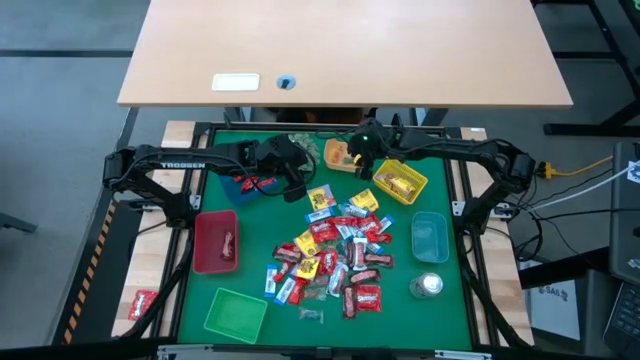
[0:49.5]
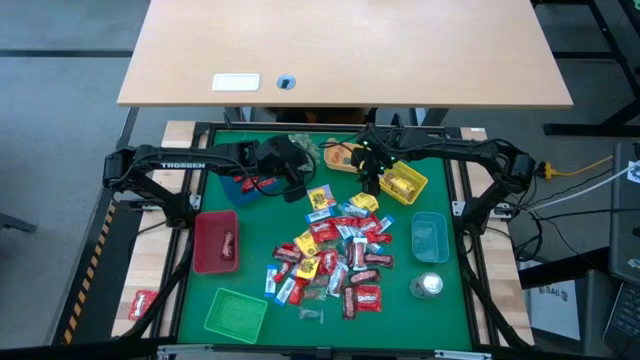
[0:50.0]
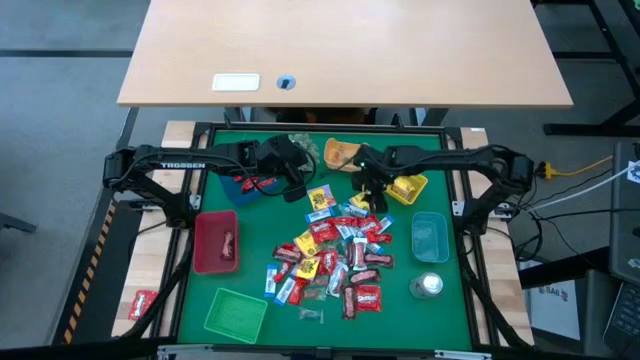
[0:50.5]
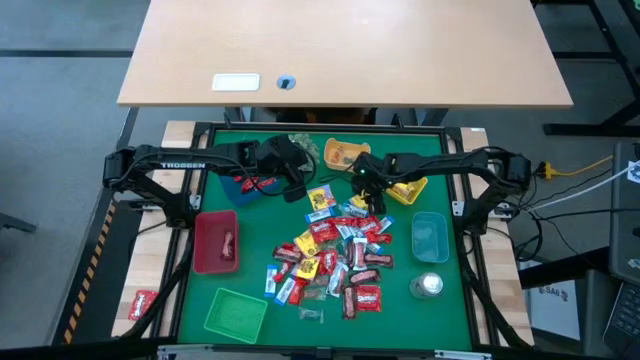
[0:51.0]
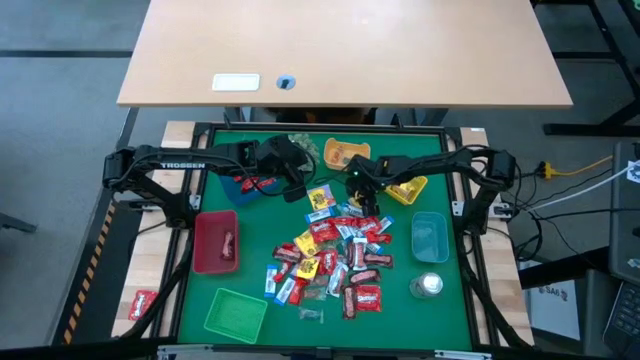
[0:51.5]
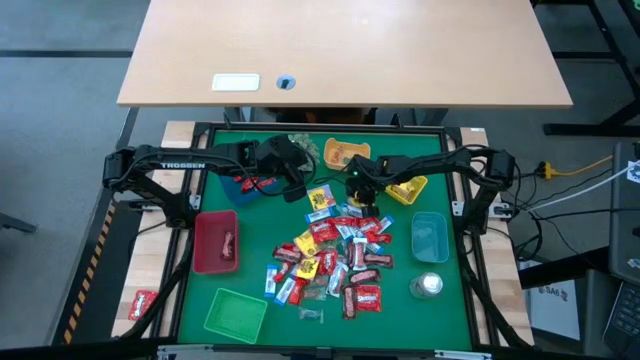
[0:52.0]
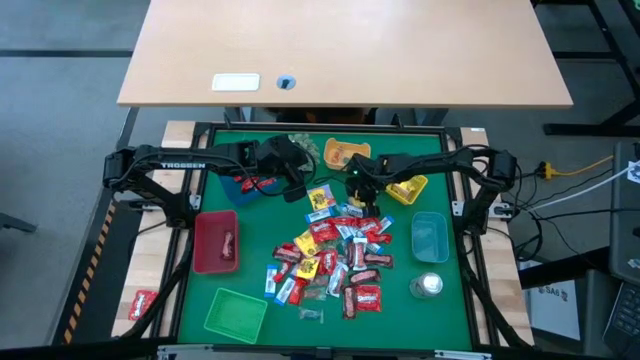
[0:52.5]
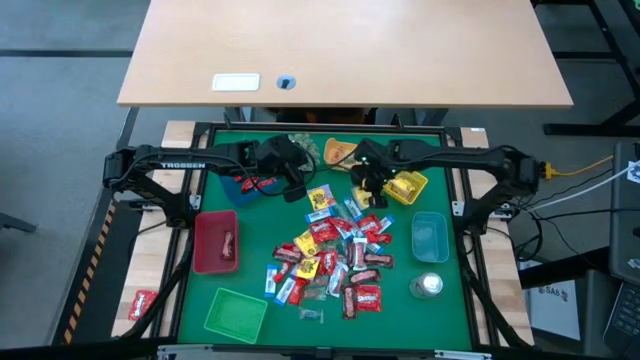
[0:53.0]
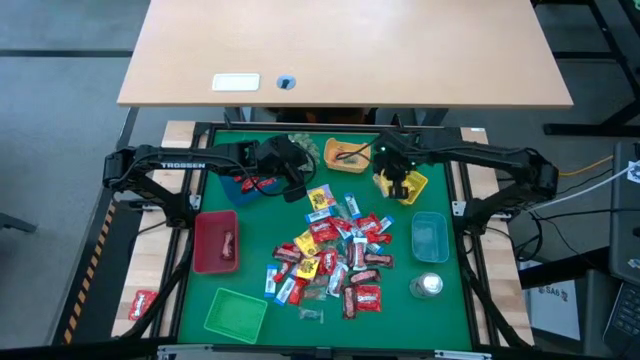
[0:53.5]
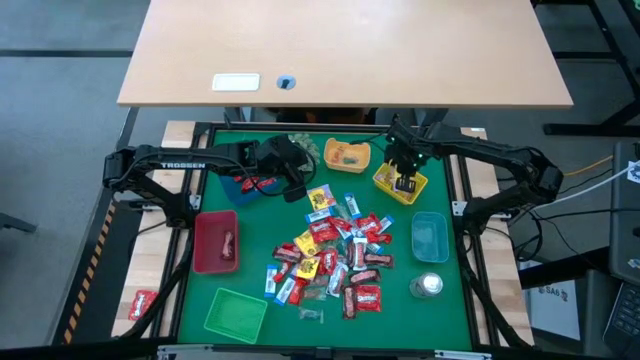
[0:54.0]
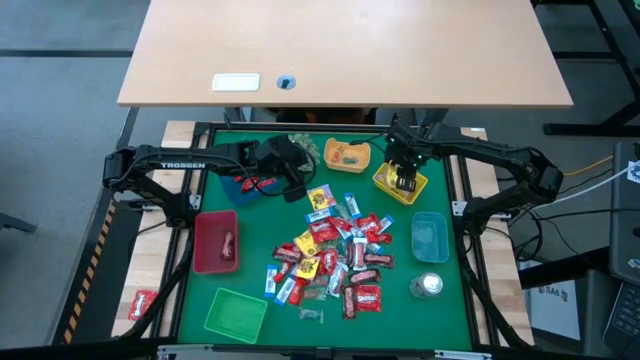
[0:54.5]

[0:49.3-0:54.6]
Task: Sort candy
Put the yellow candy into the yellow bin

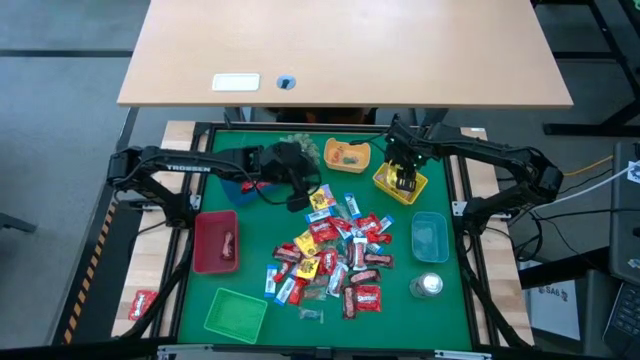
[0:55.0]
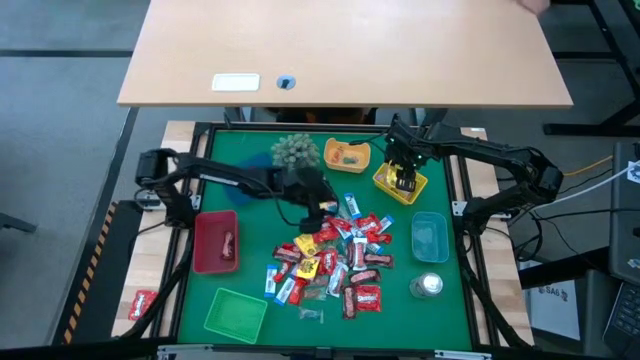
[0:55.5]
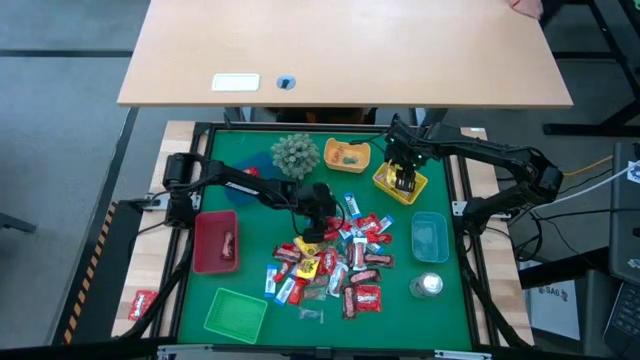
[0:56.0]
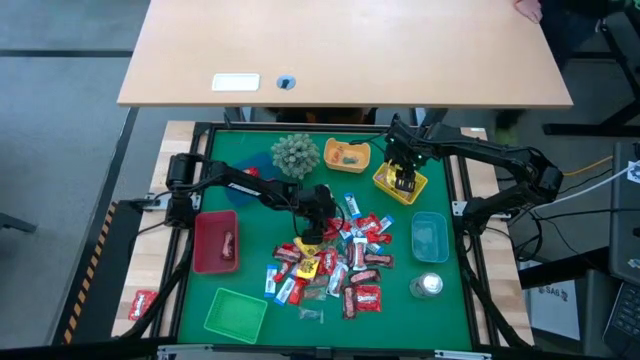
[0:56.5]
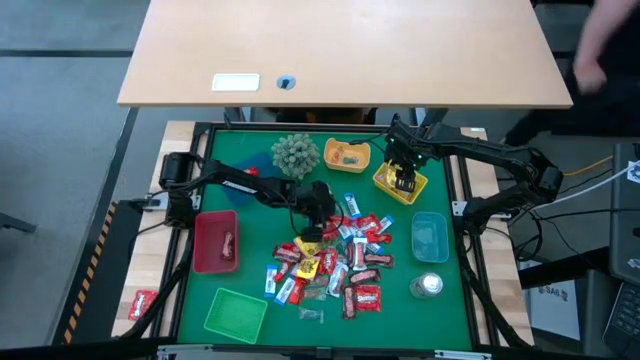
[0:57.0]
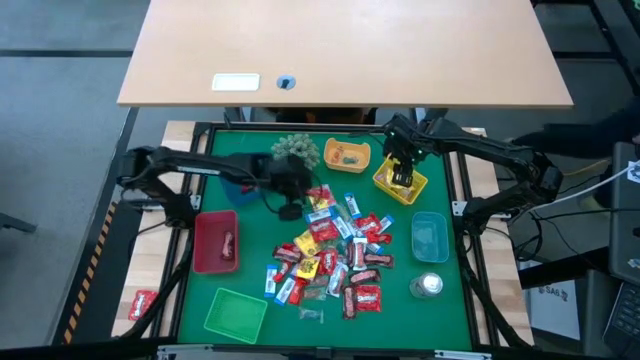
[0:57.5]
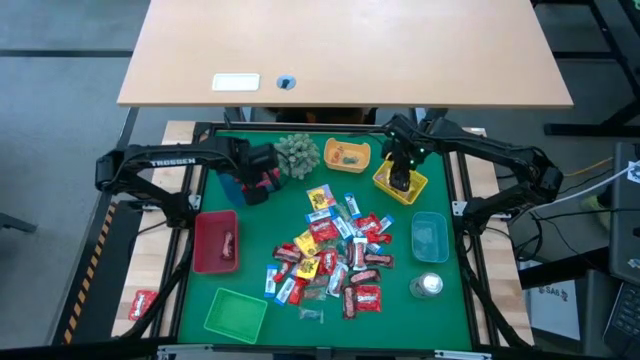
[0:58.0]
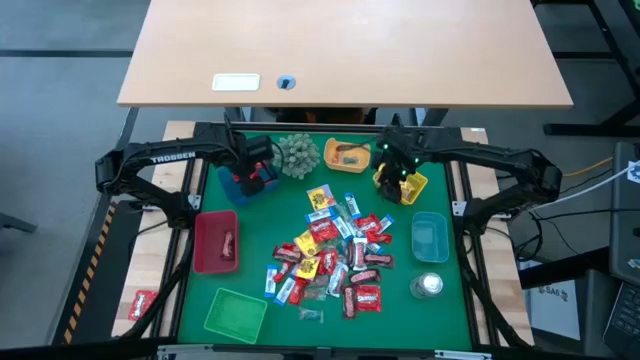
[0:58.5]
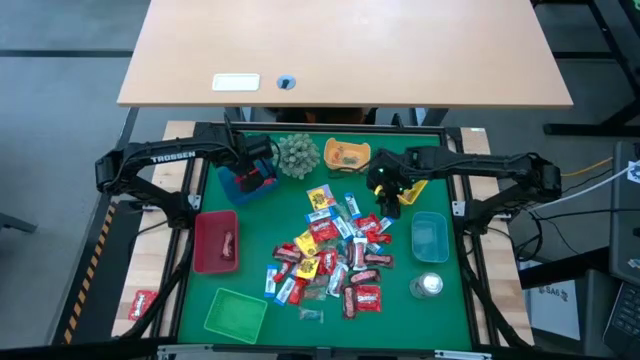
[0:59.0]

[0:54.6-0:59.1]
Put the red chocolate into the blue bin

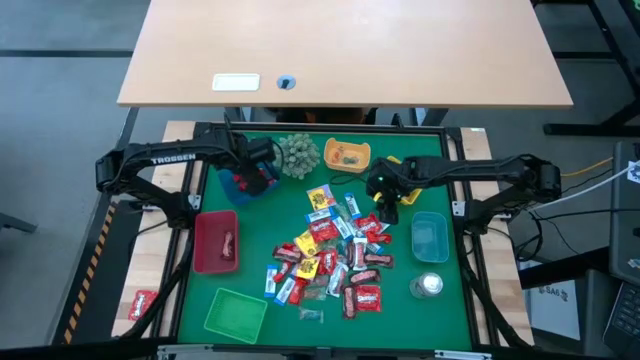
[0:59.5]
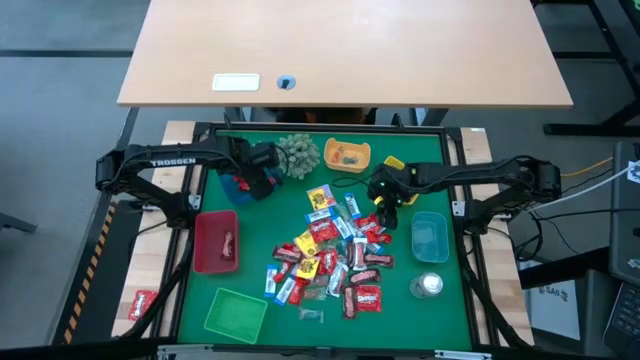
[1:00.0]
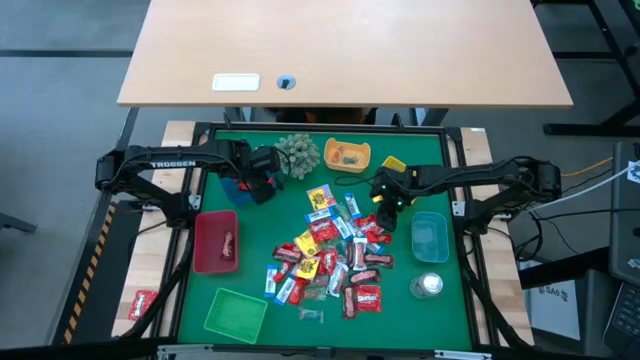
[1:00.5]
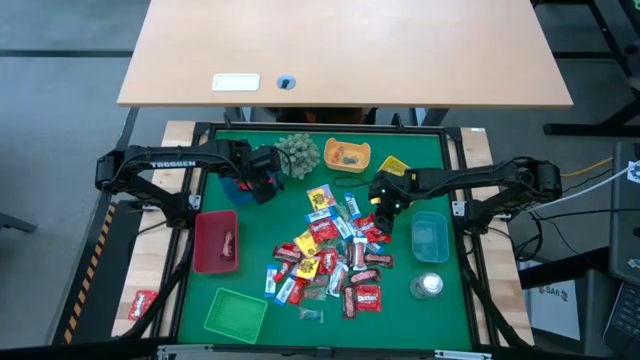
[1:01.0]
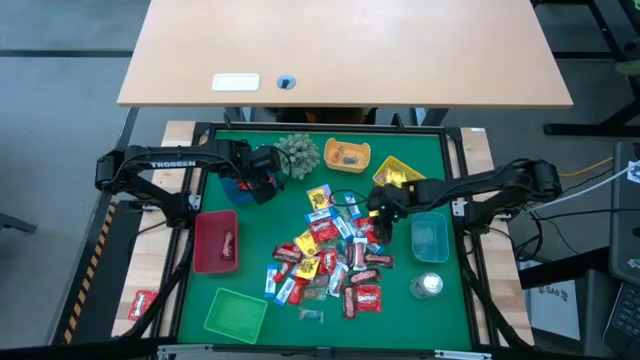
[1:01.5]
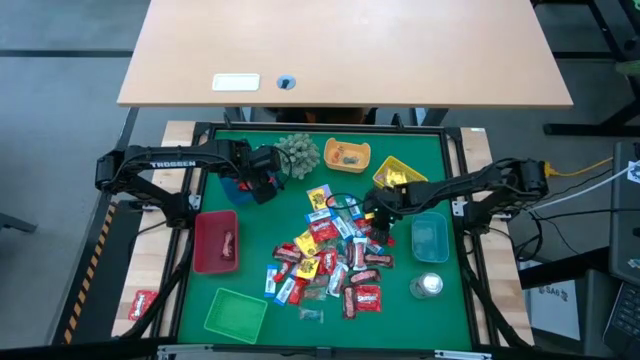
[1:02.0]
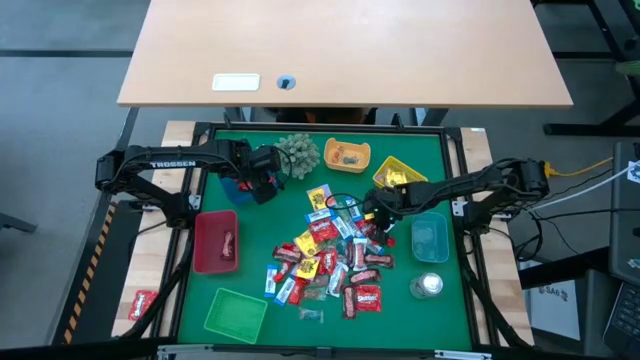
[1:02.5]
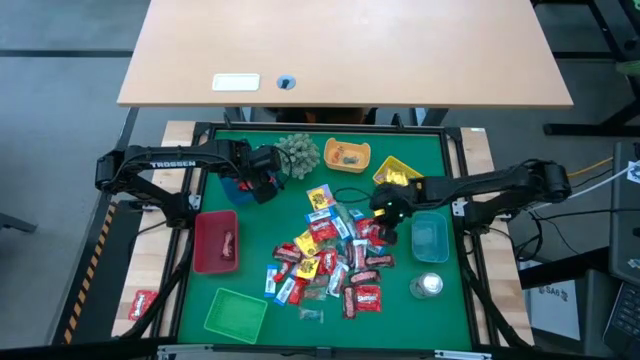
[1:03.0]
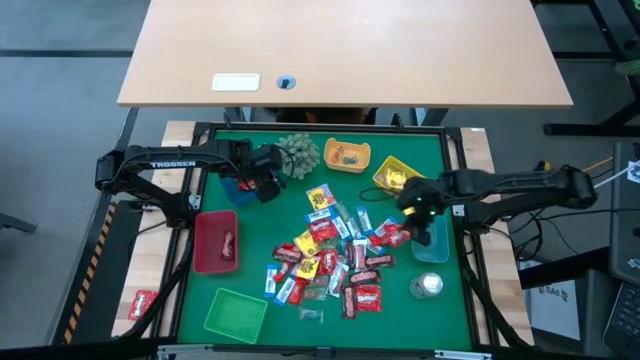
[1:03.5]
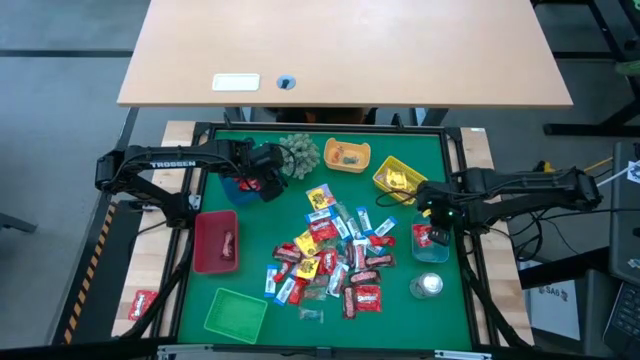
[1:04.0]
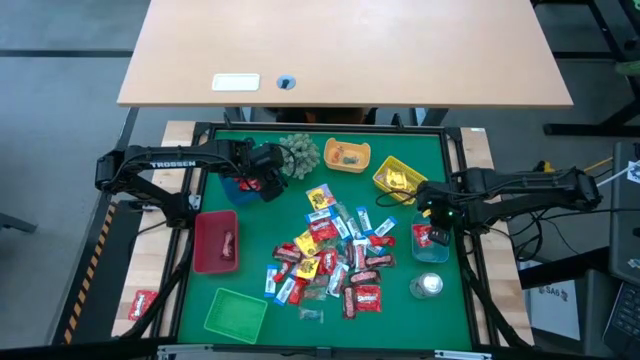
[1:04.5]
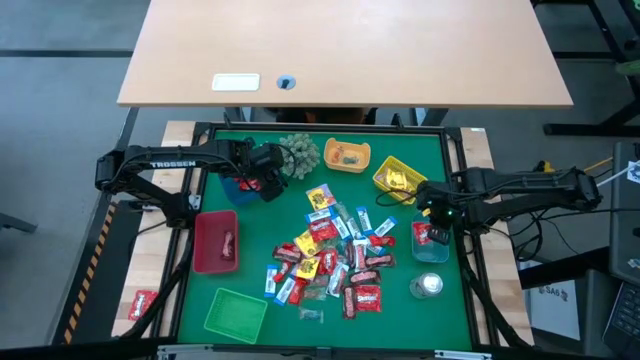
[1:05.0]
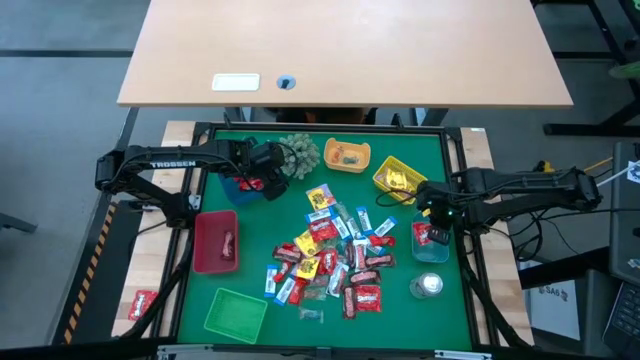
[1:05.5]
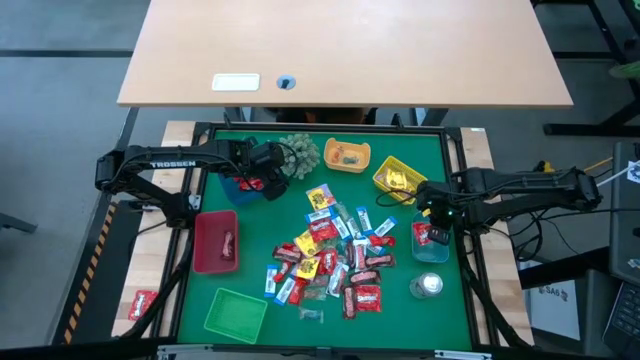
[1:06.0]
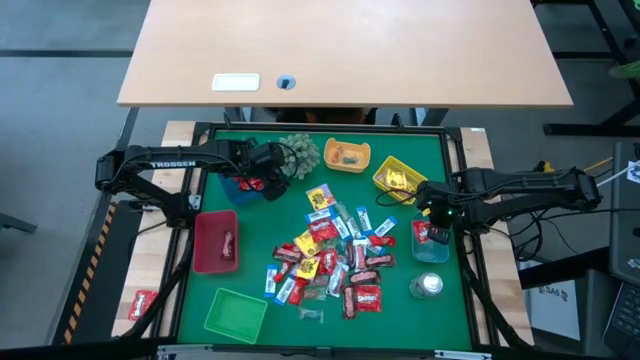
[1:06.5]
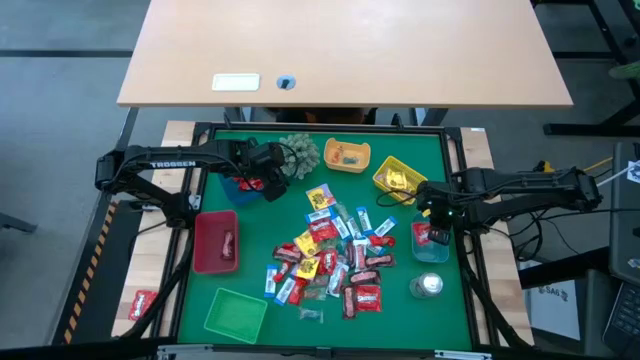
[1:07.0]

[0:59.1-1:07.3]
Put the red candy into the gray bin

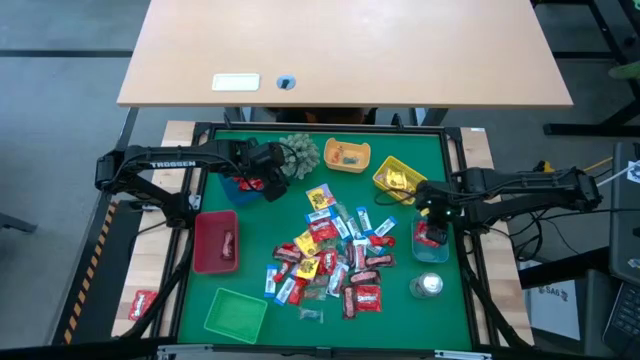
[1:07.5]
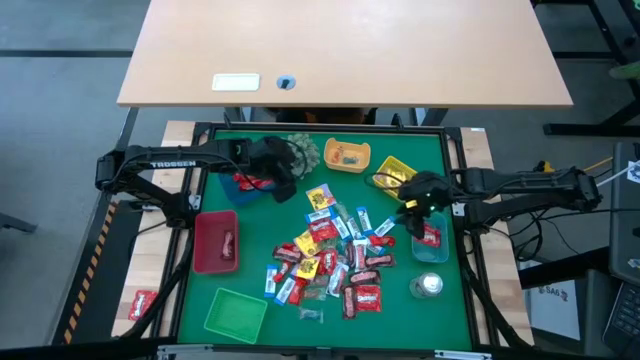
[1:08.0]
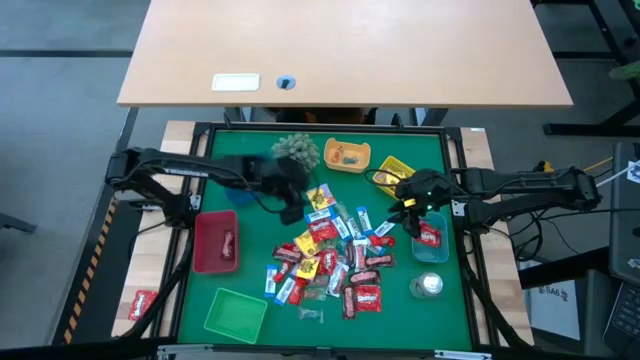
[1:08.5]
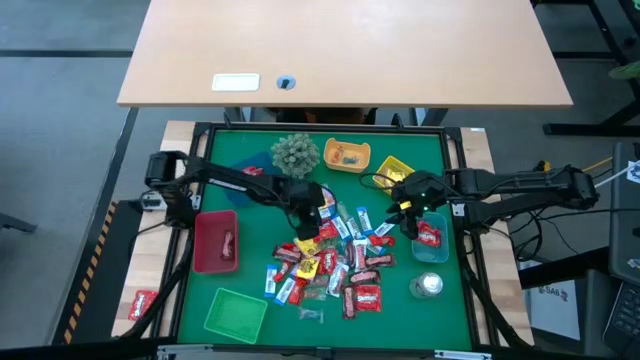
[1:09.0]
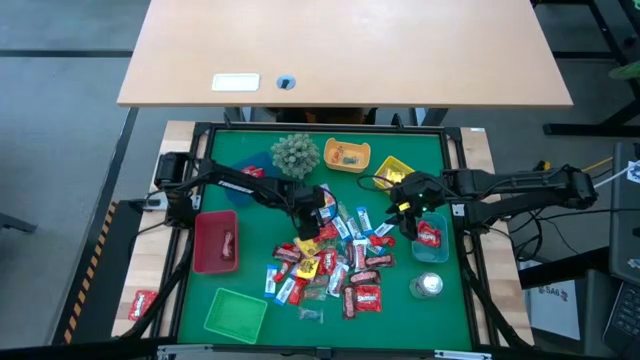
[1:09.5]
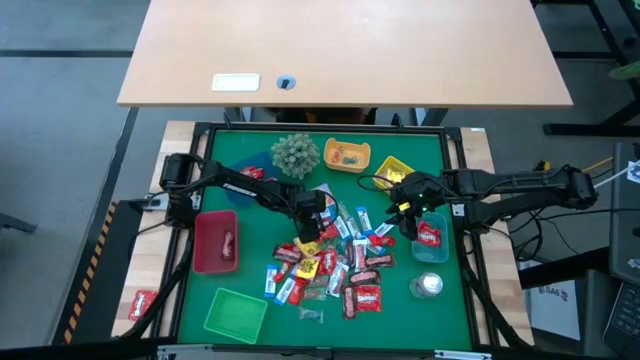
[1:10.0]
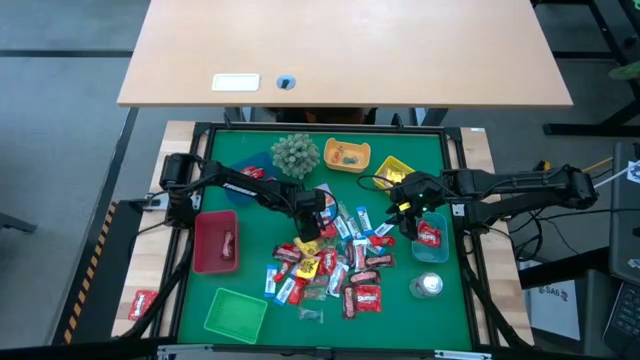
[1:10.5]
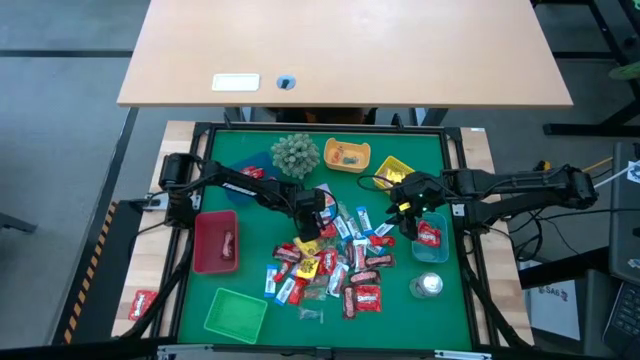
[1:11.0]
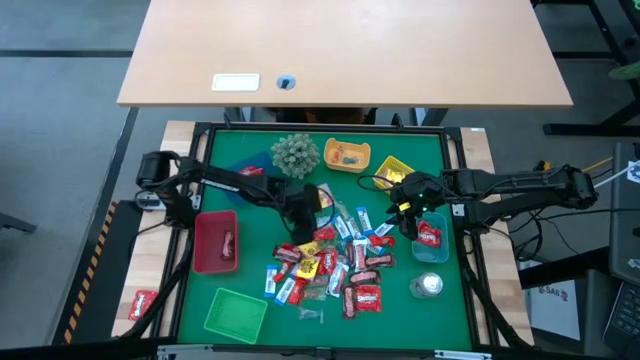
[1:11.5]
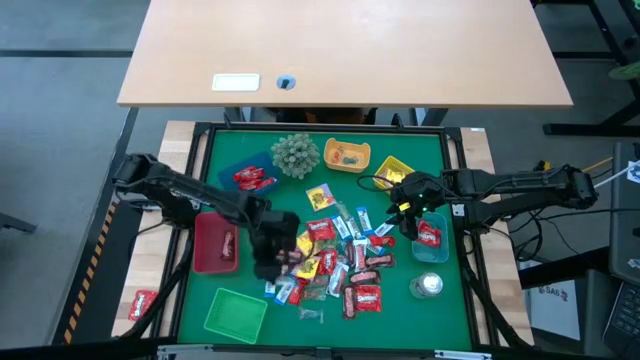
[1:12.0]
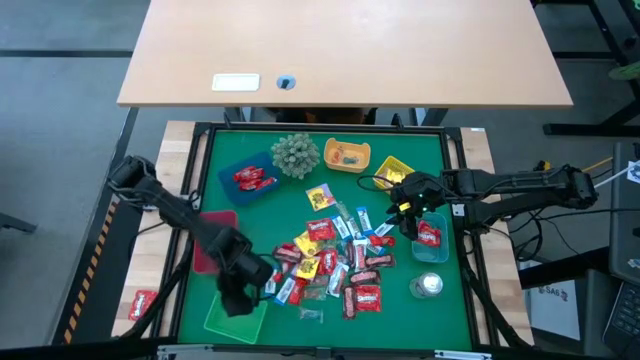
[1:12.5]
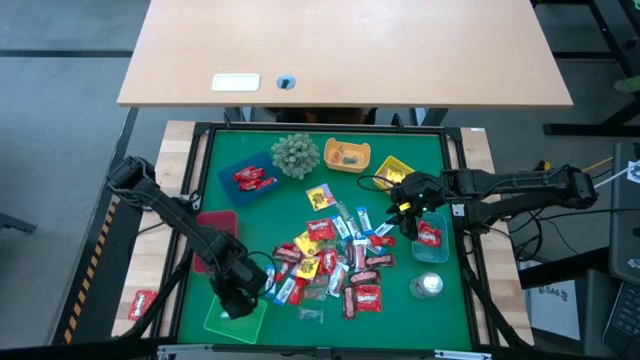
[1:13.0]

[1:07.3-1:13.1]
Put the white-blue chocolate into the green bin
